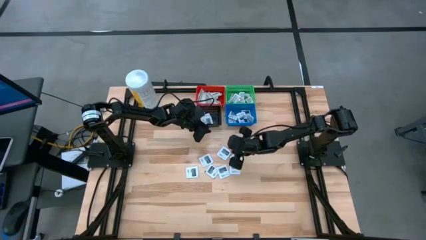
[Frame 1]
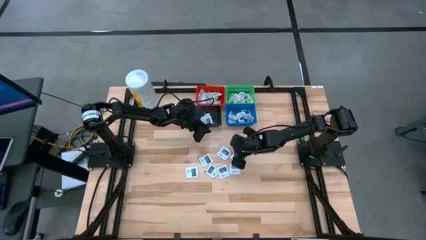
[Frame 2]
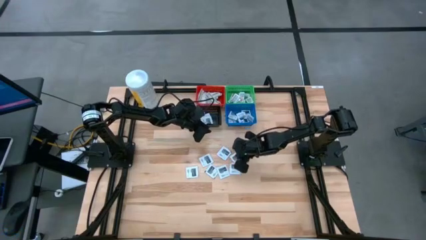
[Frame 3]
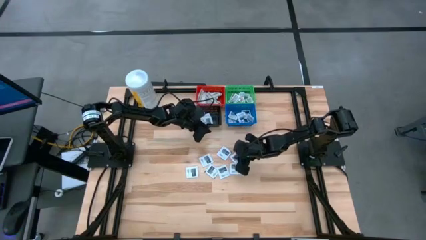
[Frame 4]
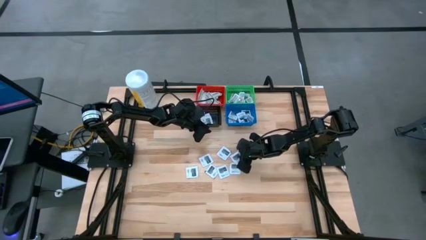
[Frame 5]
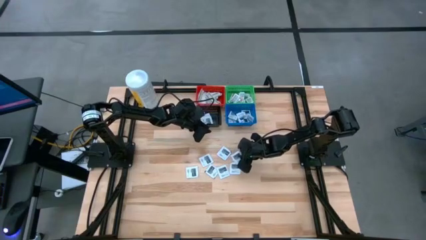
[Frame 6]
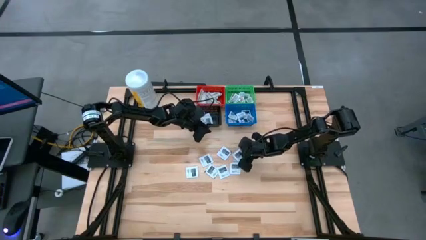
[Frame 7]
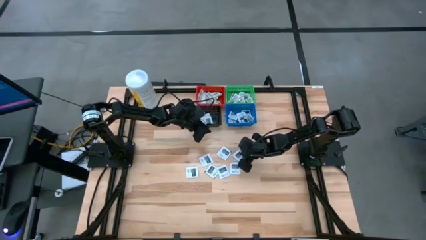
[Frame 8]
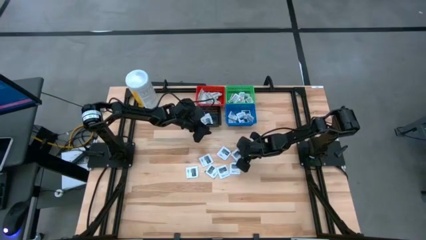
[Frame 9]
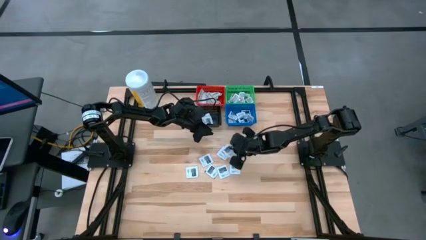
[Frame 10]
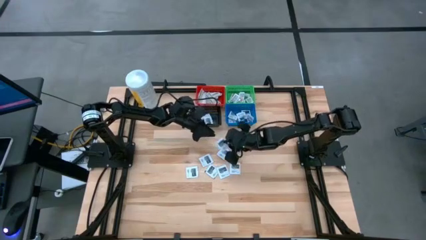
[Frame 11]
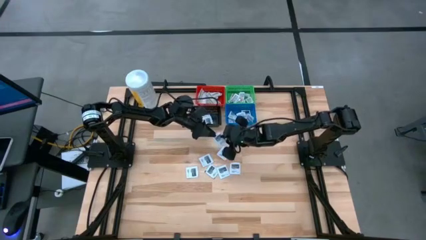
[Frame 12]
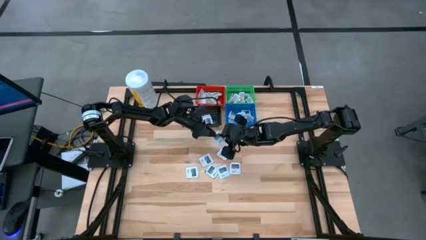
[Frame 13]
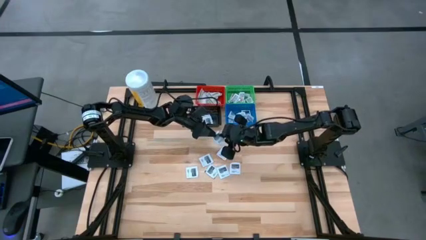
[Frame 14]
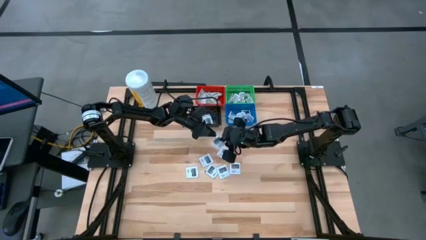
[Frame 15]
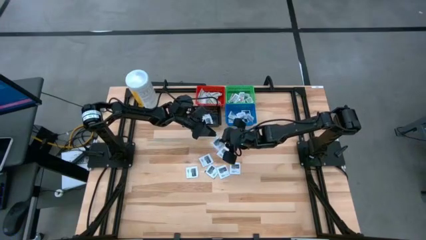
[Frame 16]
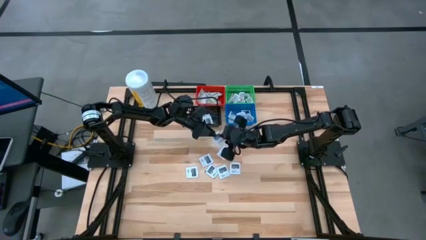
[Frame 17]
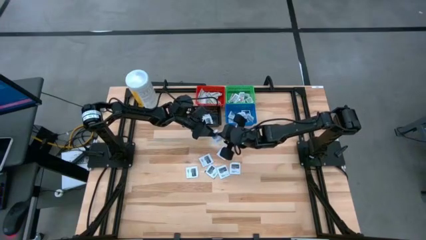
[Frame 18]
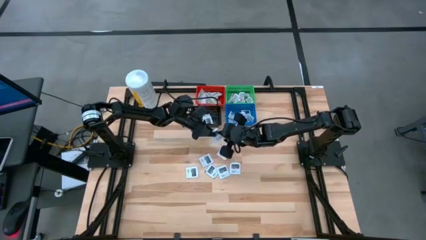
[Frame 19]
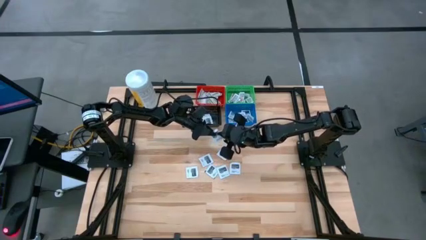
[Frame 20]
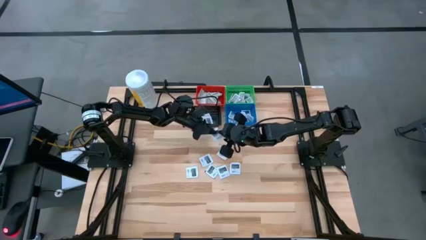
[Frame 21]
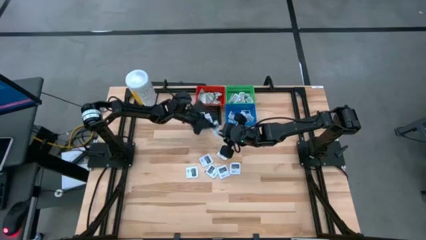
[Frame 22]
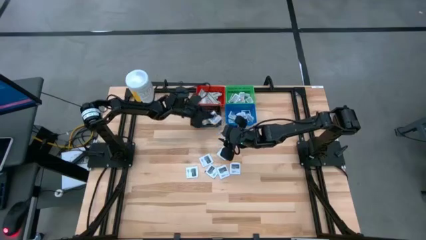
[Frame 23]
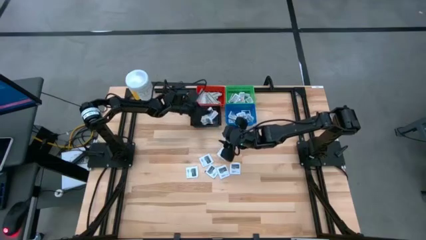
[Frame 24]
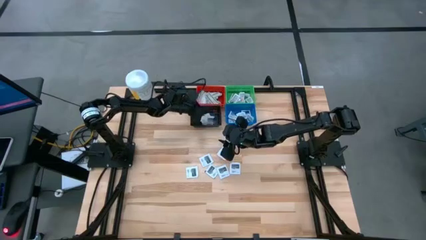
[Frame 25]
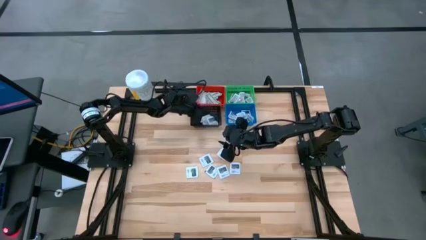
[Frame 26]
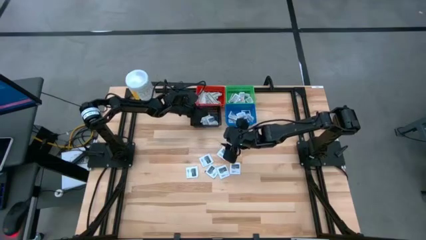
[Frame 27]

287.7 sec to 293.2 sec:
Task: Pick & Place First Aid Supplies
Put the towelette pack into the black basket

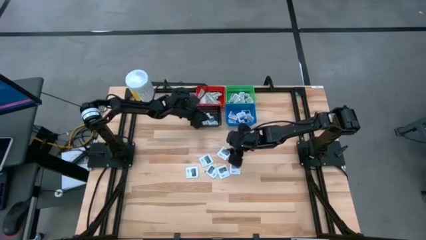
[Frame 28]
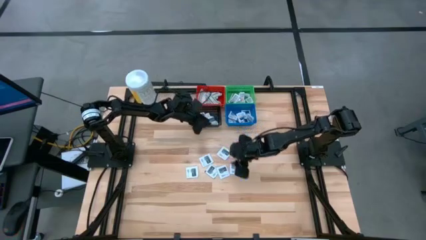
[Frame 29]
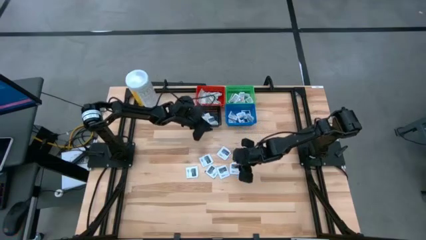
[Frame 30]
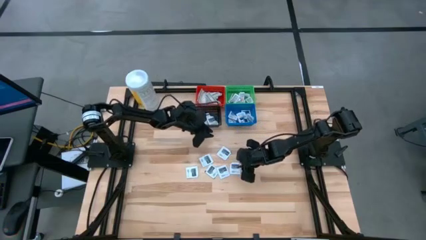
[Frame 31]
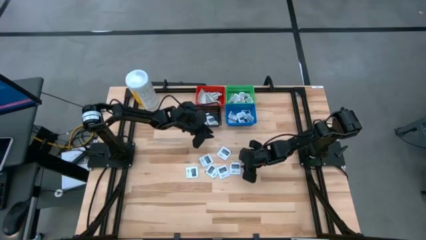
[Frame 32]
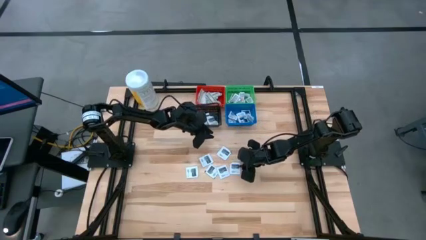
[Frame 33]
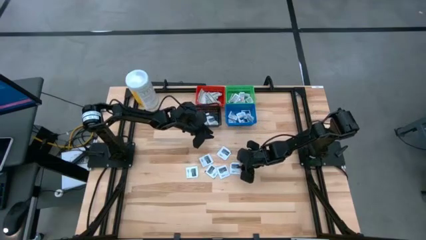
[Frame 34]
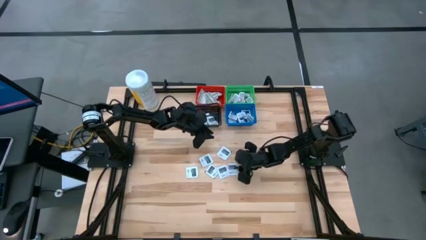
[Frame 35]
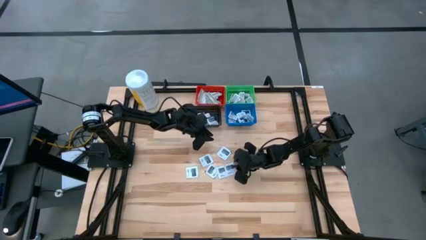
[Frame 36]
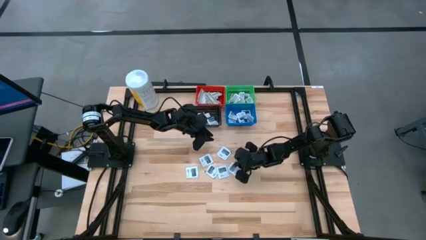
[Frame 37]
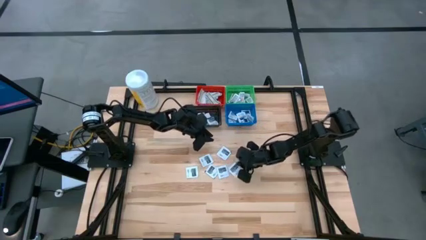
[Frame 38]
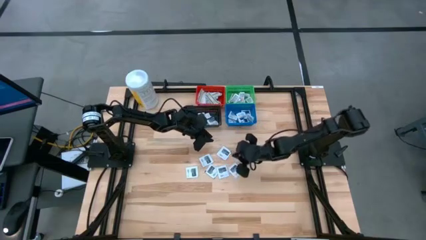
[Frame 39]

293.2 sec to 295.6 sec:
Put the towelette pack into the black basket

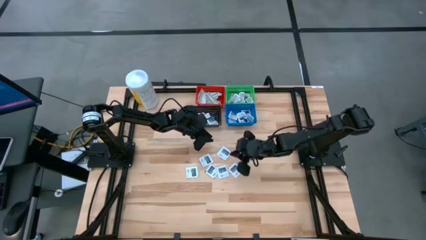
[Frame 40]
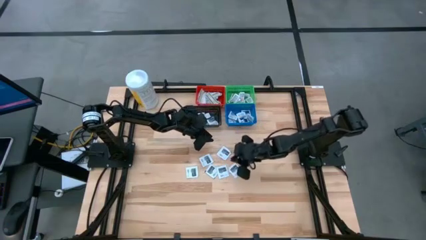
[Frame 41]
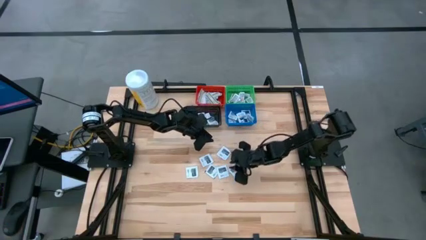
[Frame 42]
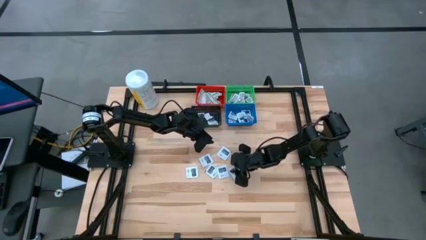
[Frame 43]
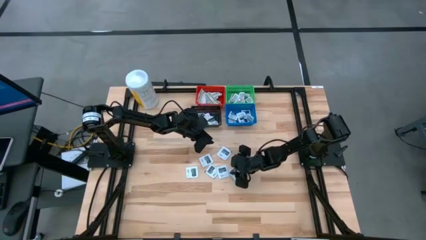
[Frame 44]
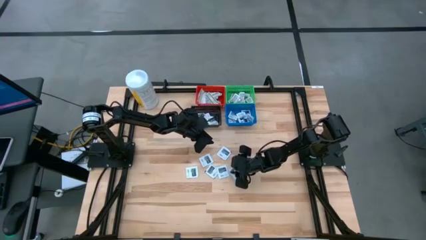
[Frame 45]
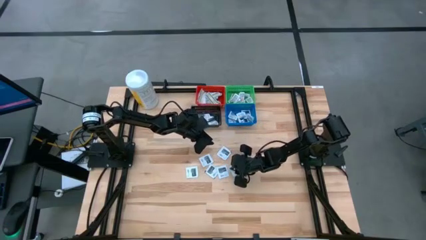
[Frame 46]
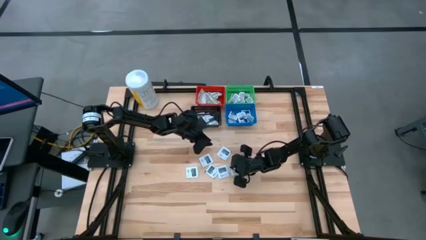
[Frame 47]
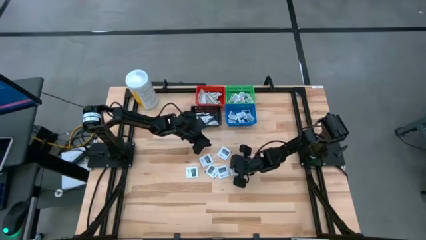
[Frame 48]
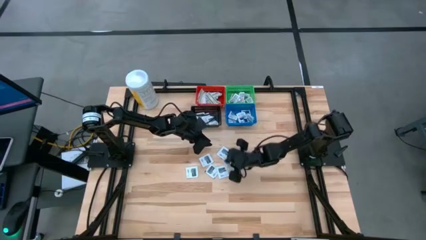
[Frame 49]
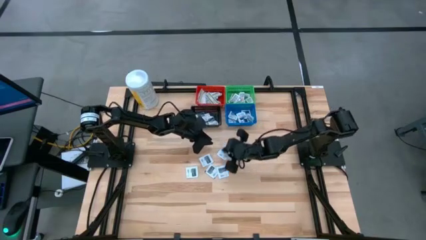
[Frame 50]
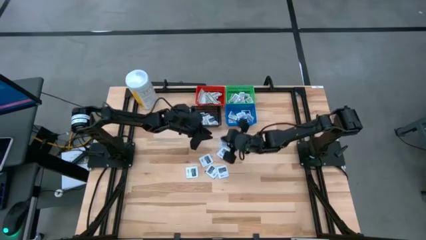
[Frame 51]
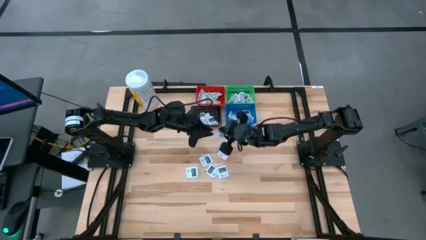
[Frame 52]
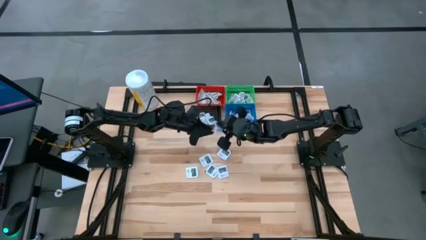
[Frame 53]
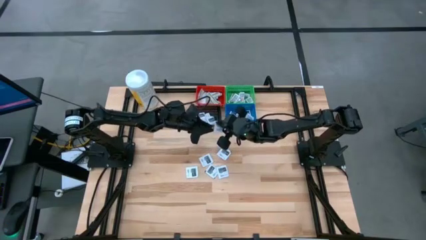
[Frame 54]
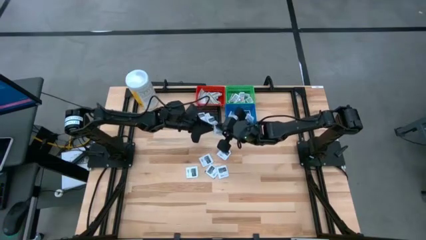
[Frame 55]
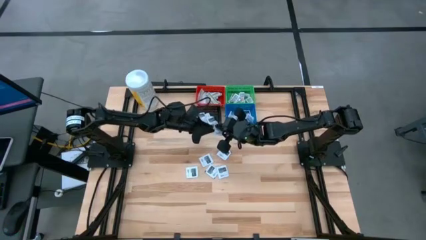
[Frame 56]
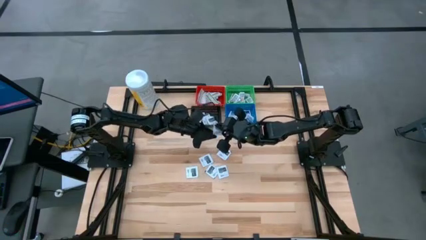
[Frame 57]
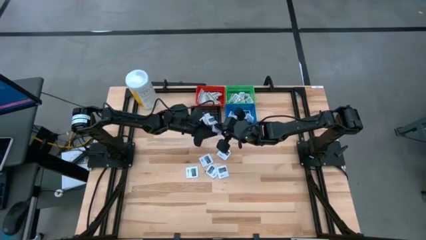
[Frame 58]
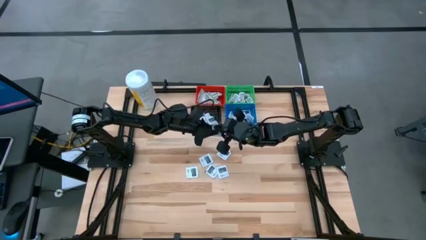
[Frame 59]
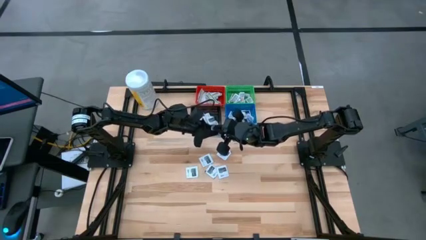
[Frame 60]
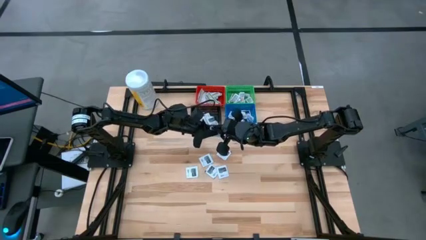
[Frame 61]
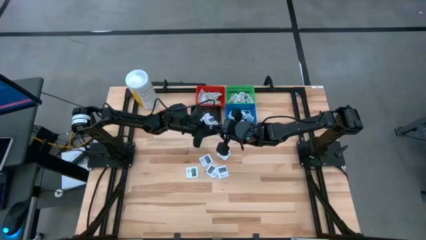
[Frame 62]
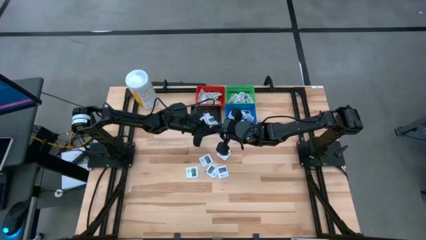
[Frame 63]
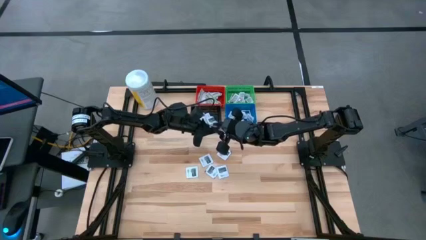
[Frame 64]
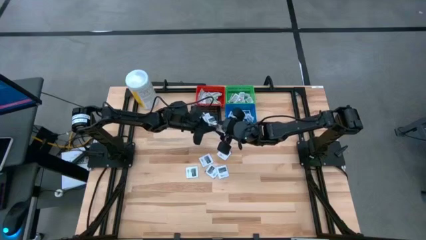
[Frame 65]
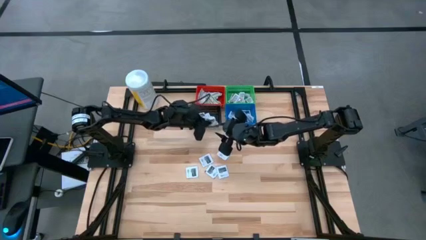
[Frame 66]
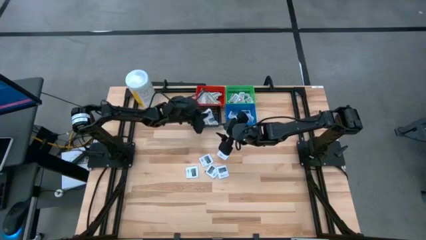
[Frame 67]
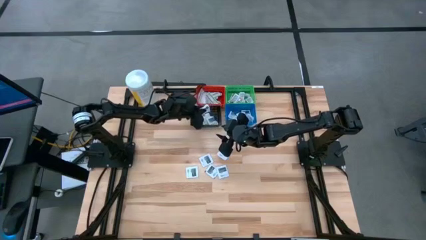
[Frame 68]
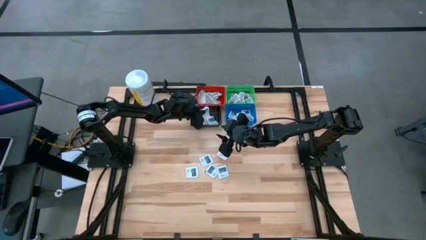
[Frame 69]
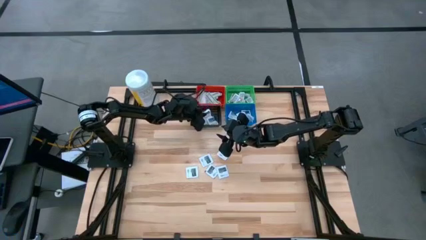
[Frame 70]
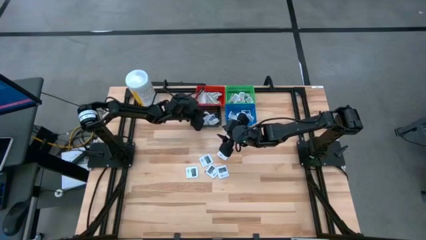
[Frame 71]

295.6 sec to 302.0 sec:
Put the towelette pack into the black basket

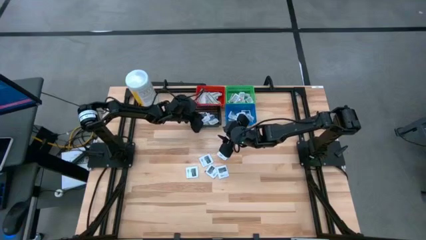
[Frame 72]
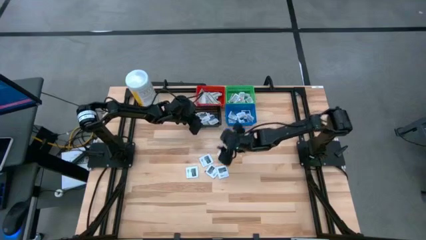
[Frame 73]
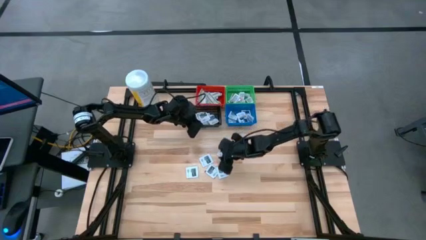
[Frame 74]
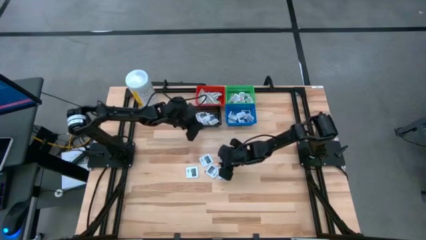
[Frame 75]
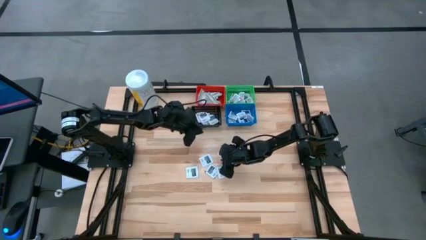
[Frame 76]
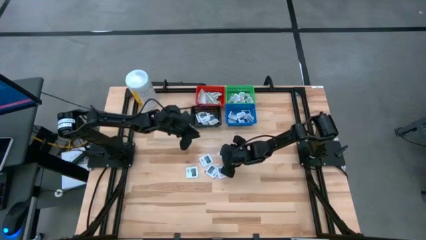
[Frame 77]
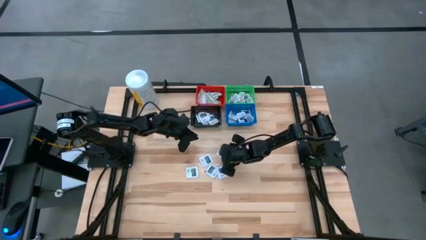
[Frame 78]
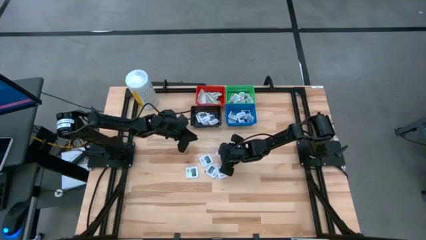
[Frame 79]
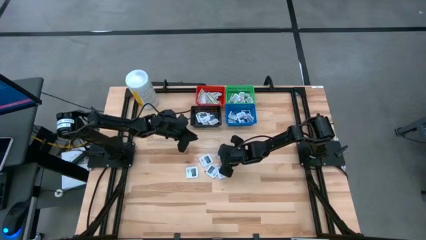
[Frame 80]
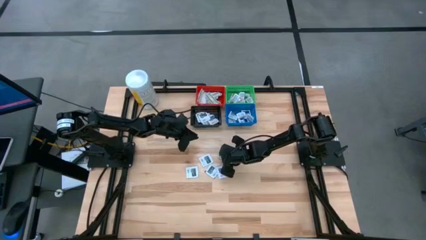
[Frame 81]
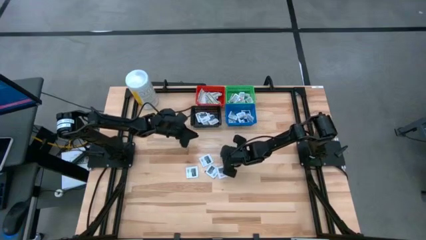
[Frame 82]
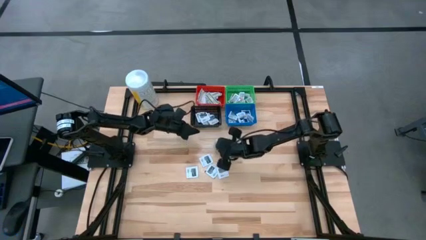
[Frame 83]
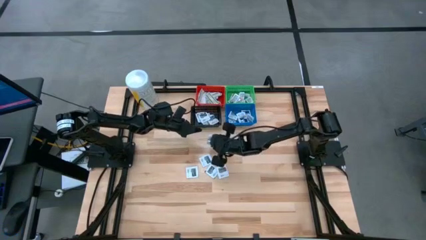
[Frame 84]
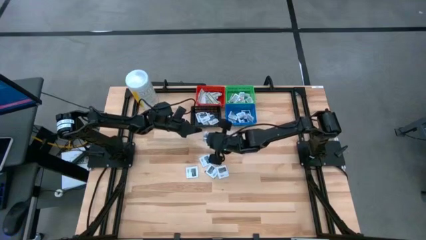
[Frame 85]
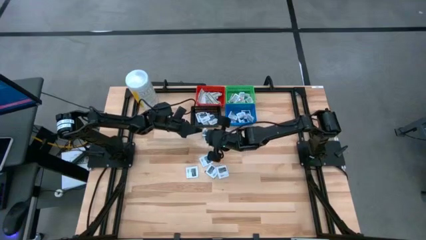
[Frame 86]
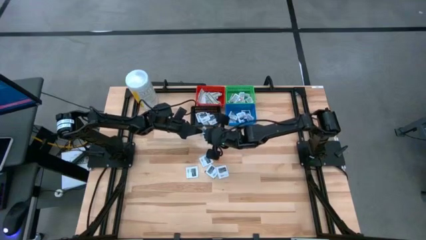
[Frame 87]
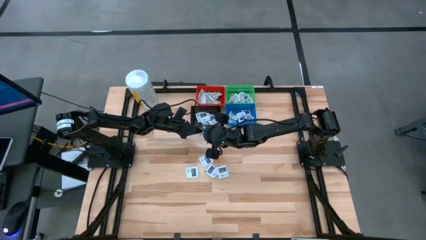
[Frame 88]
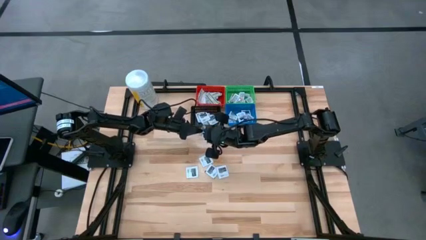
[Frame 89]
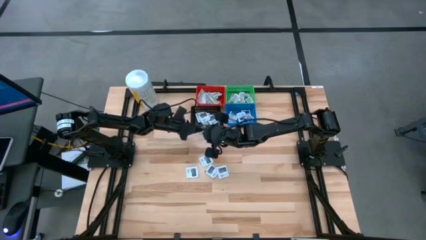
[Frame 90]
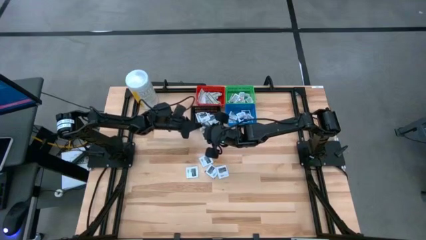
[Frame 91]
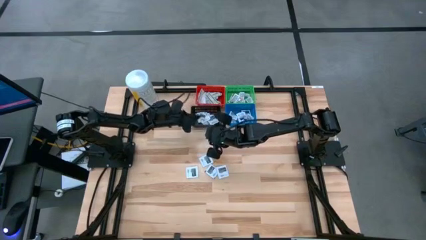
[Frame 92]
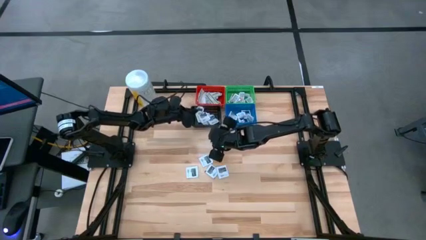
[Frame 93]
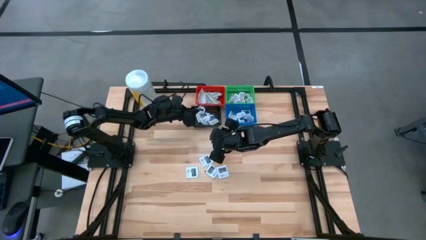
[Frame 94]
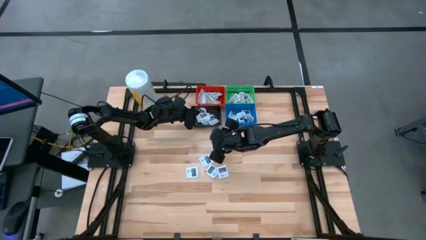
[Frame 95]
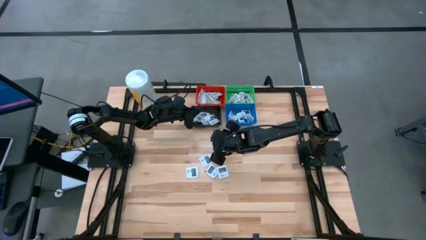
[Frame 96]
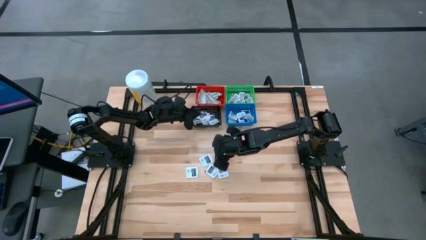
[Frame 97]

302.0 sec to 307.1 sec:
Put the towelette pack into the black basket
